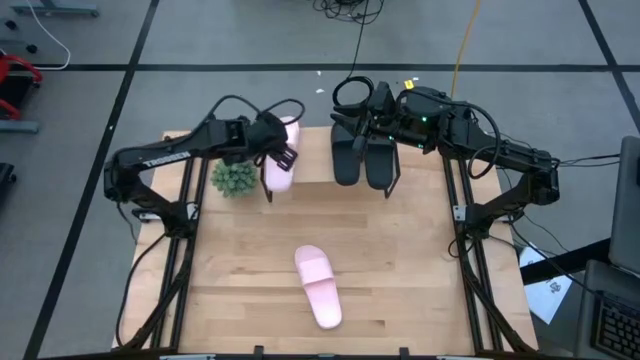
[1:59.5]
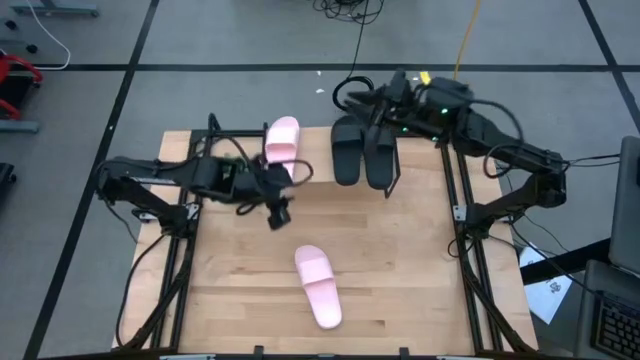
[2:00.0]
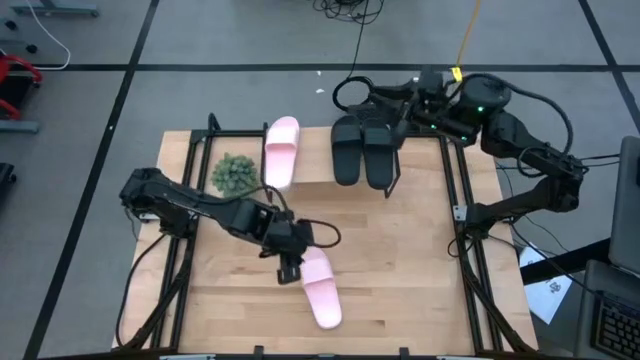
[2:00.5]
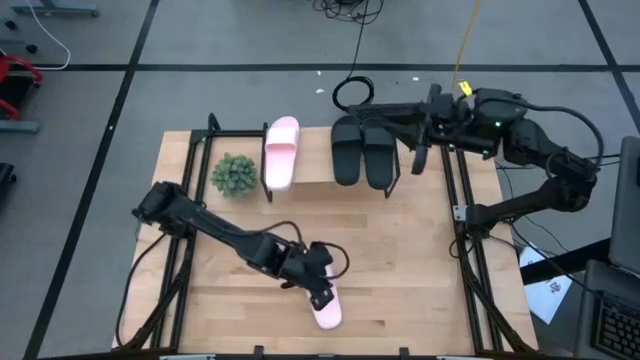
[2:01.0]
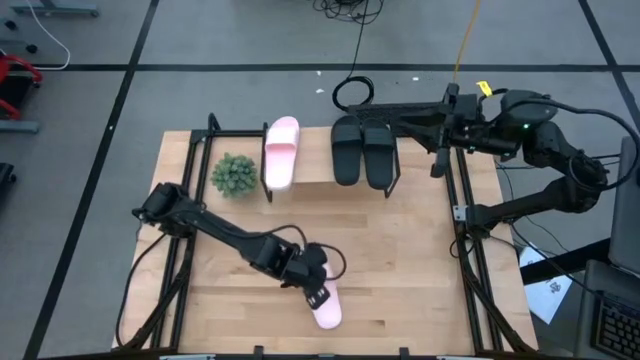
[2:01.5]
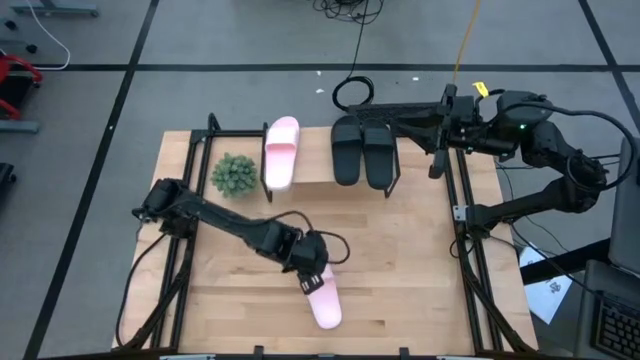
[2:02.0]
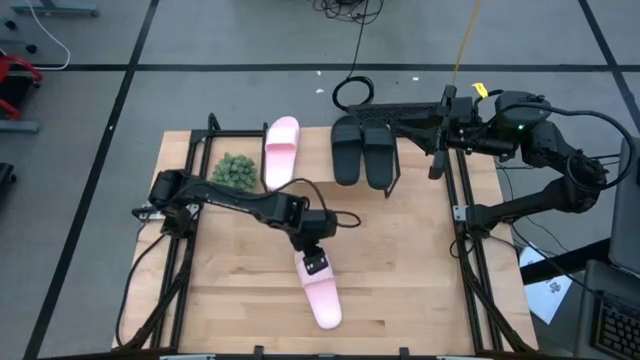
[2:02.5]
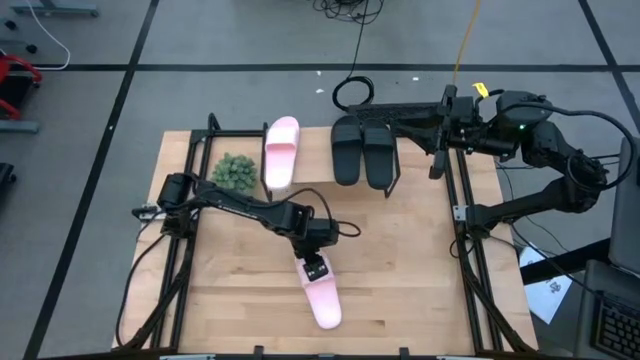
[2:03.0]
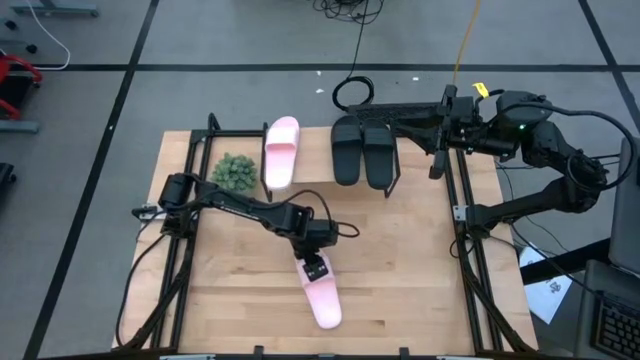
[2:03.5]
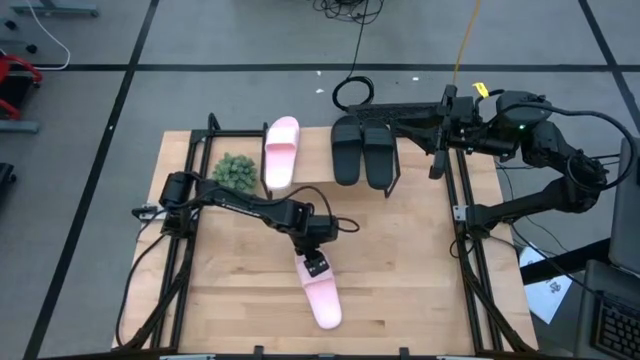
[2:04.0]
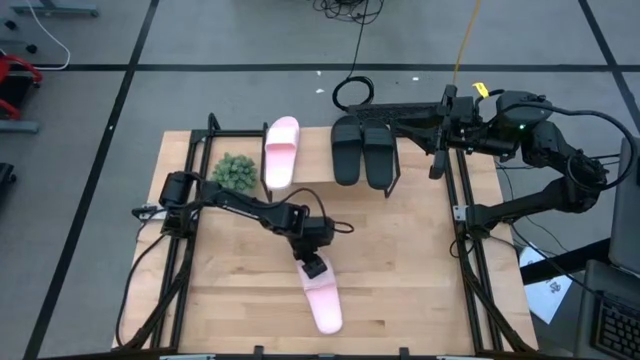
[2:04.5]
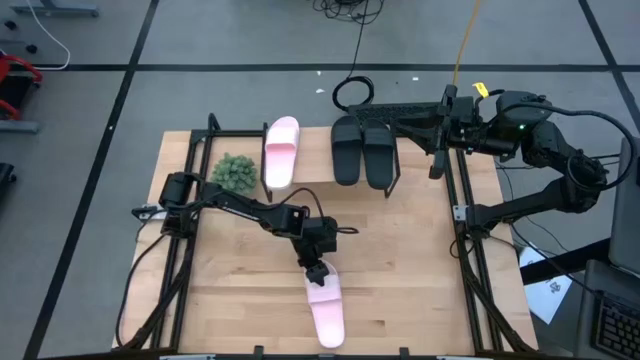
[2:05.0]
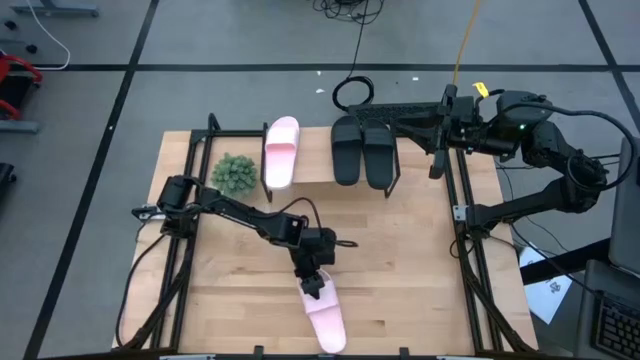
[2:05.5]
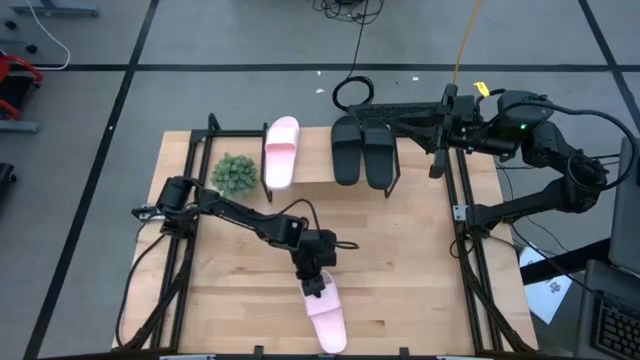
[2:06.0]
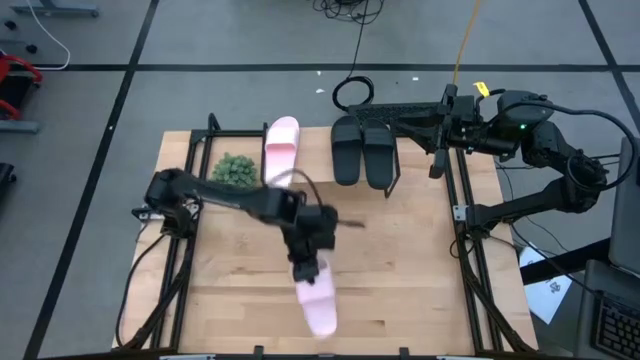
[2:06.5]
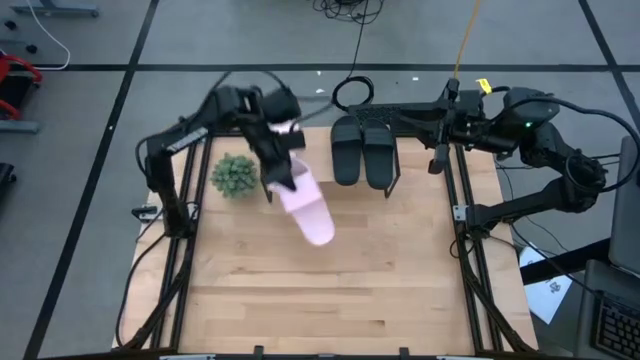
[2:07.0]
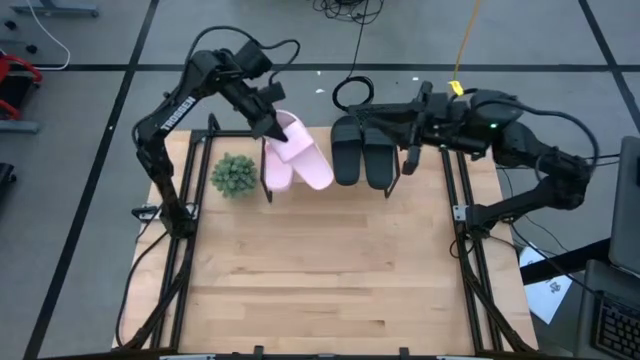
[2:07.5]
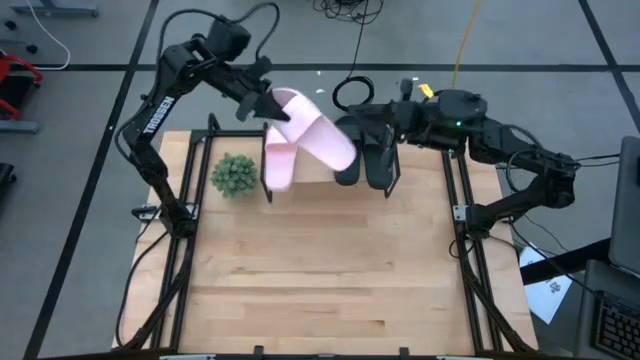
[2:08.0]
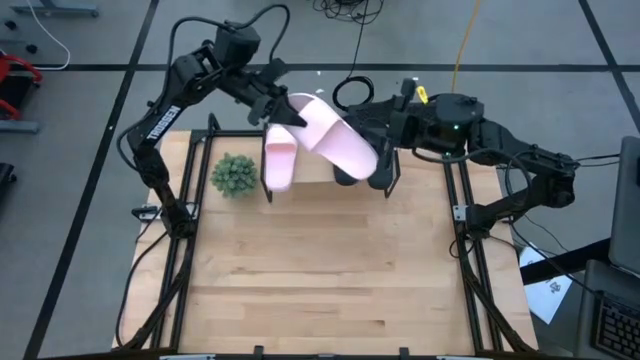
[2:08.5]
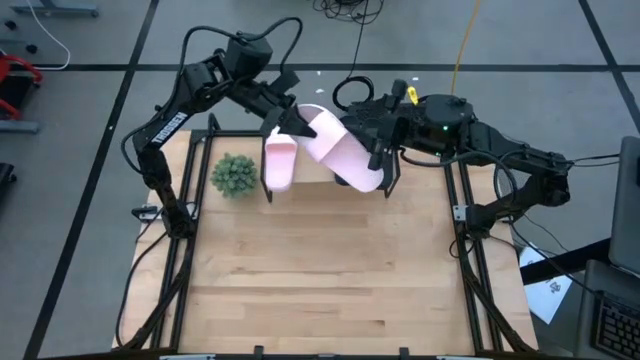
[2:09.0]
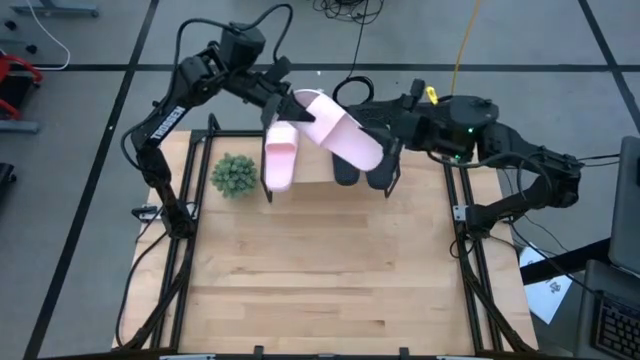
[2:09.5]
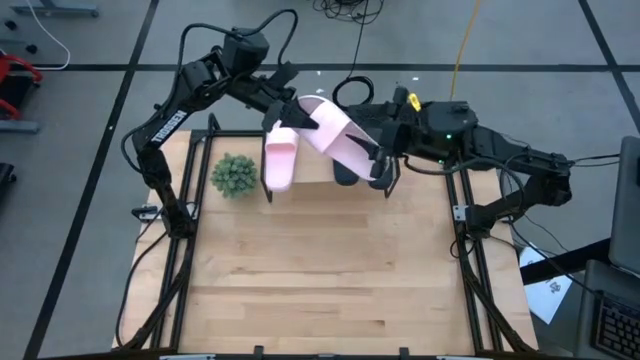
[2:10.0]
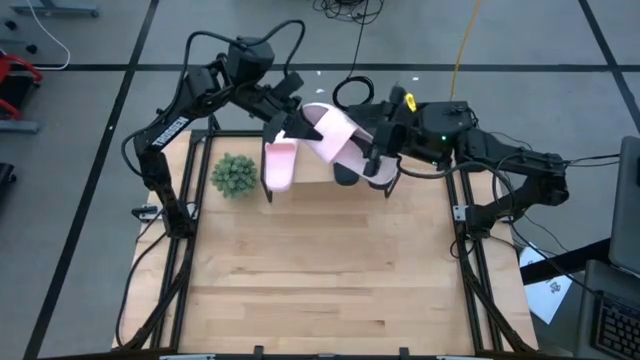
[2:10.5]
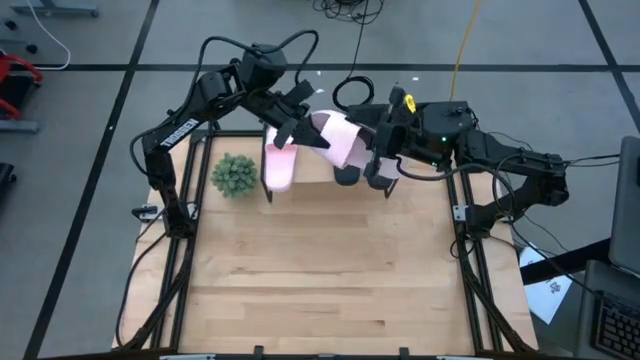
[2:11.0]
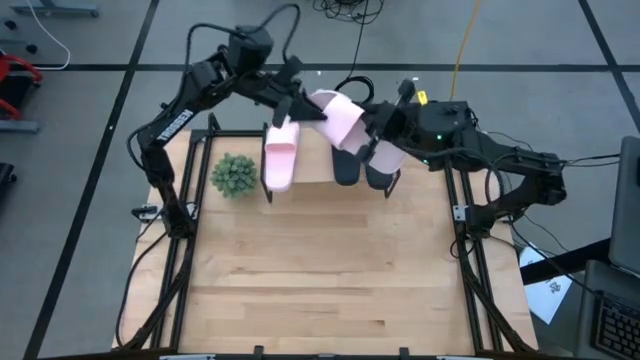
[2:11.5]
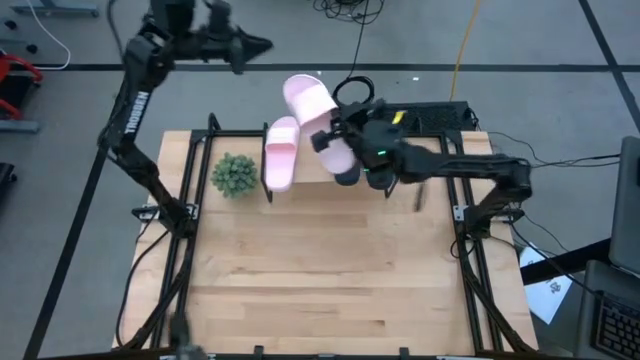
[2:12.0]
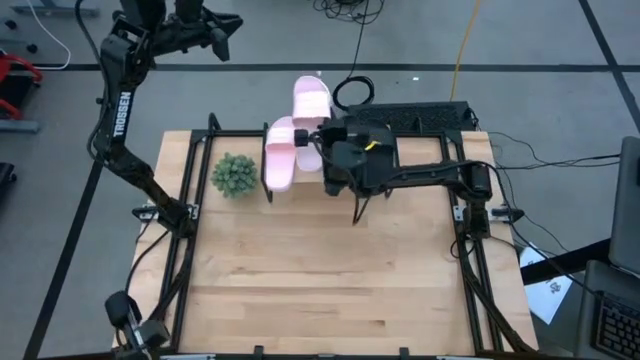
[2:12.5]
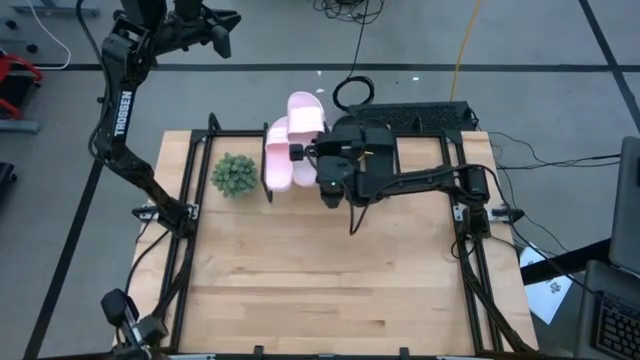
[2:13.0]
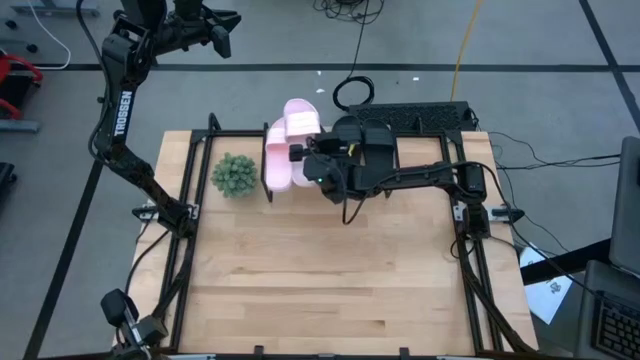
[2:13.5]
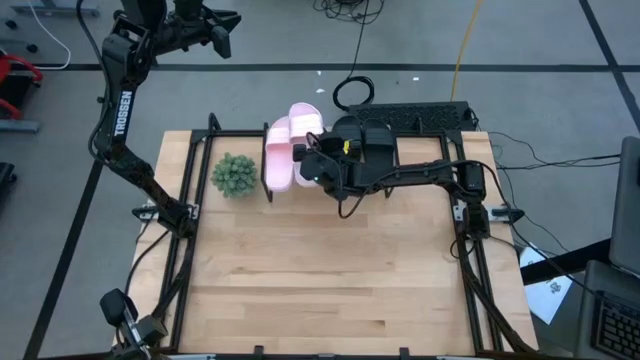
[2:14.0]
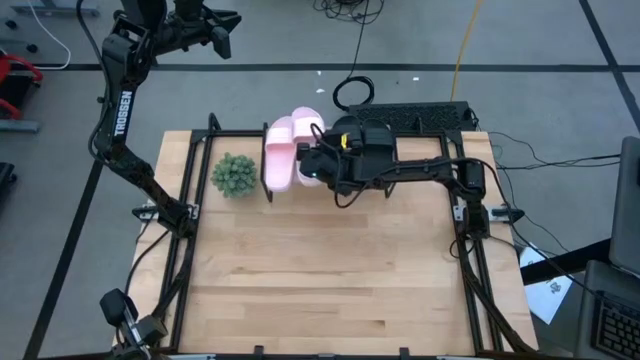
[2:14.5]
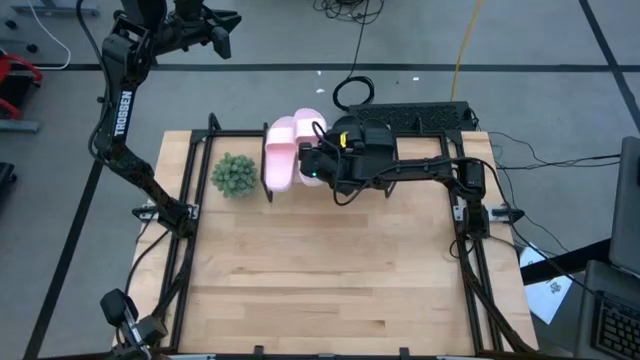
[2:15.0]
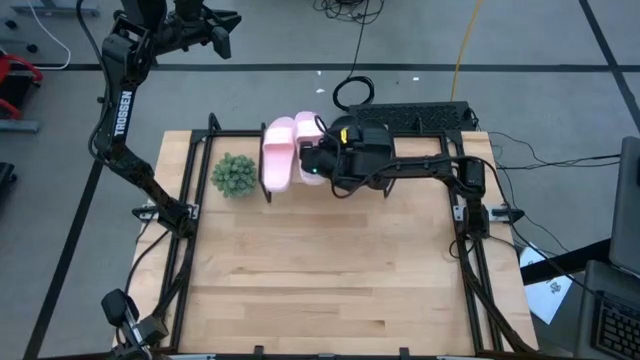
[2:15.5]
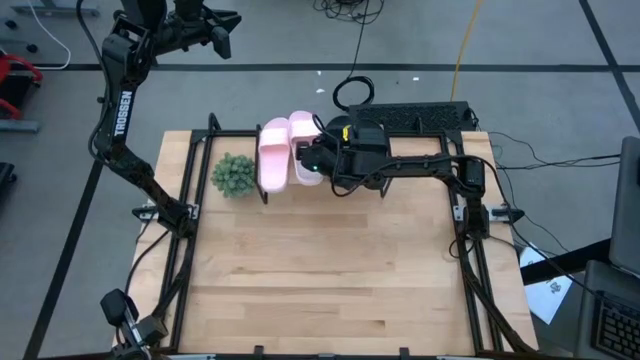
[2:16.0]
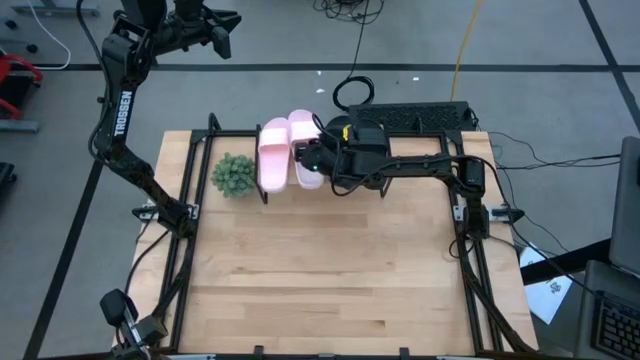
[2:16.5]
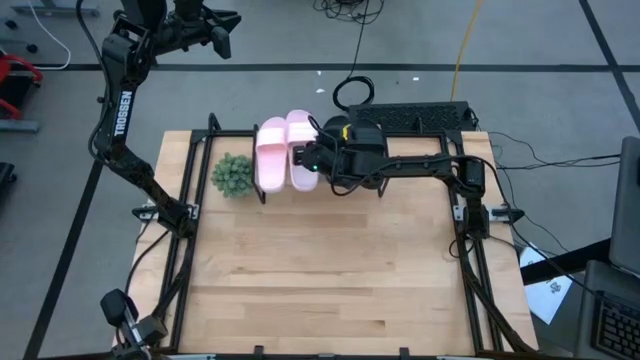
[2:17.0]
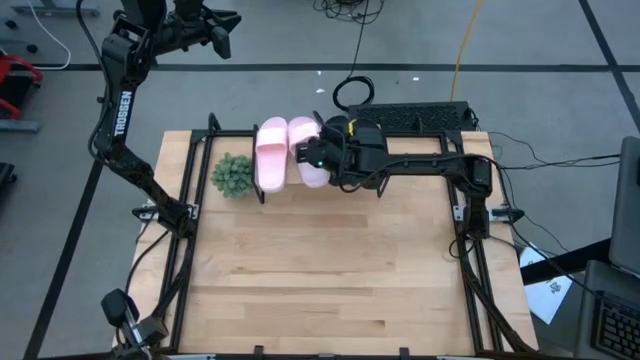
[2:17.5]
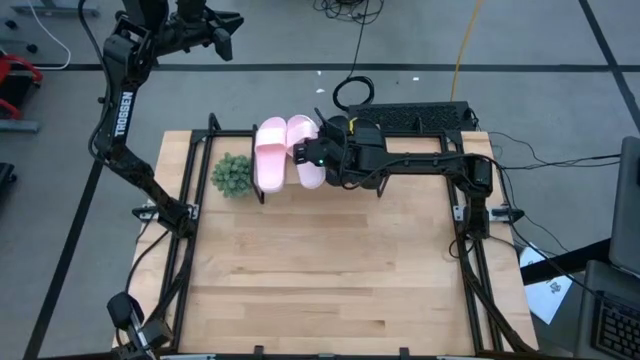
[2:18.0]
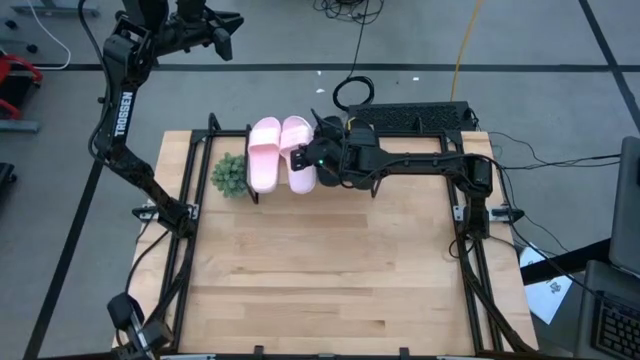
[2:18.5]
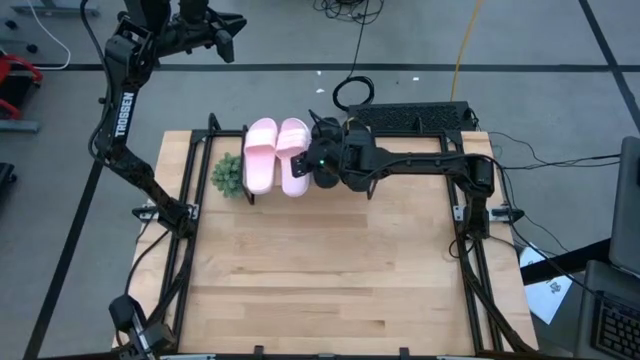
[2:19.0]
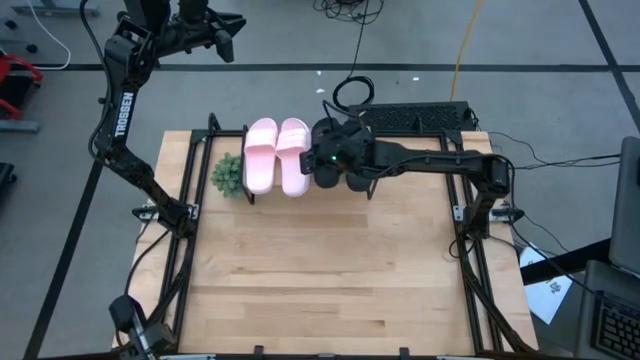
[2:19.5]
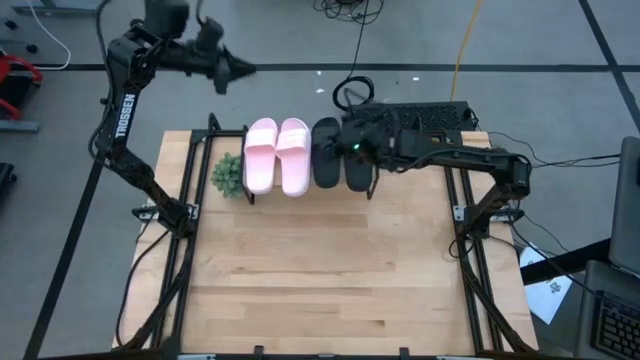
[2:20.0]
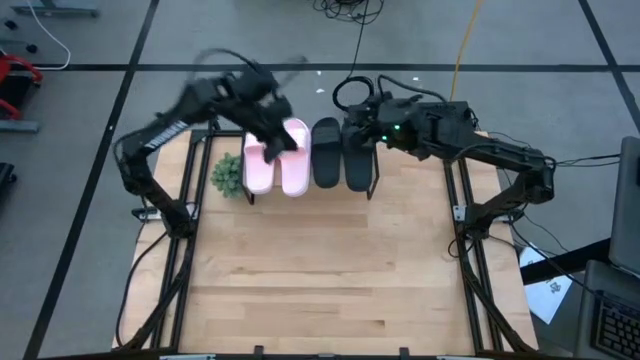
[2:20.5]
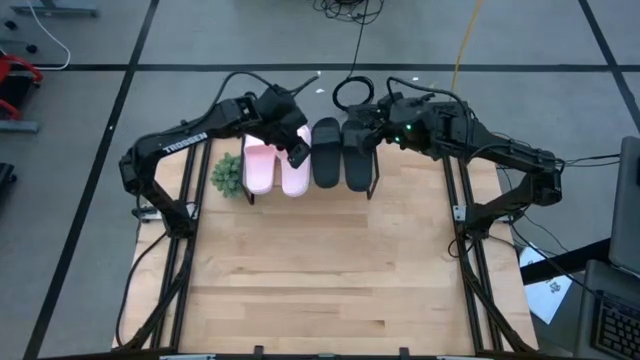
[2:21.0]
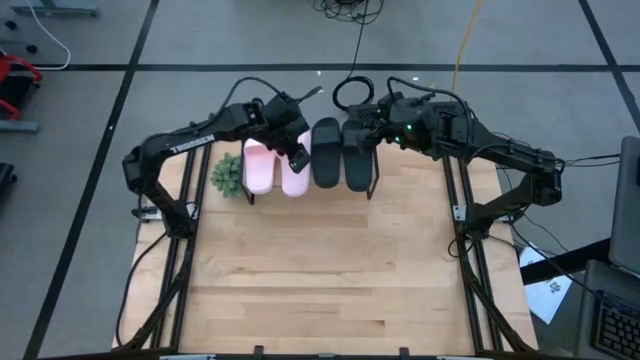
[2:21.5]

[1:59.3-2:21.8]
Task: Pick and place slides into the shelf
Put the pink slipper on the shelf
